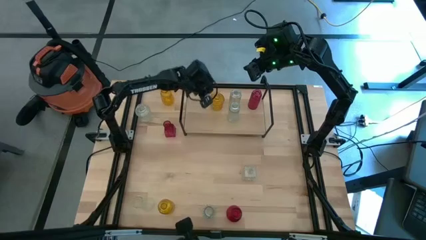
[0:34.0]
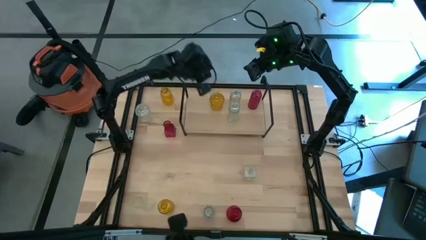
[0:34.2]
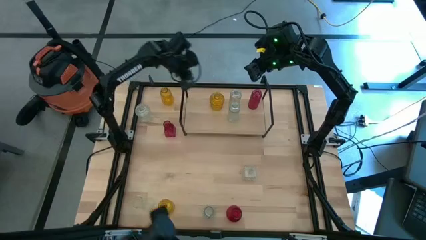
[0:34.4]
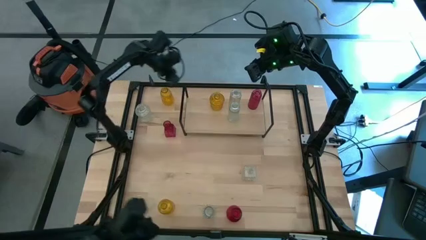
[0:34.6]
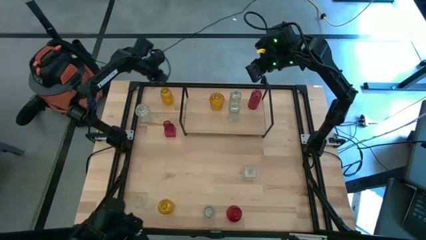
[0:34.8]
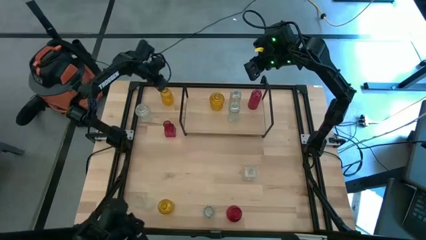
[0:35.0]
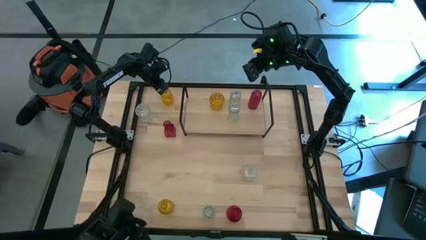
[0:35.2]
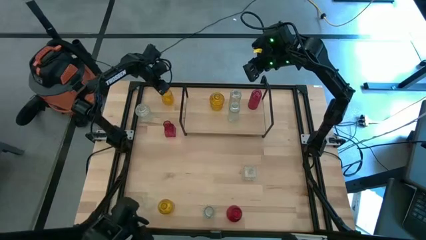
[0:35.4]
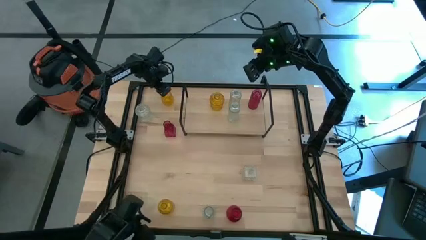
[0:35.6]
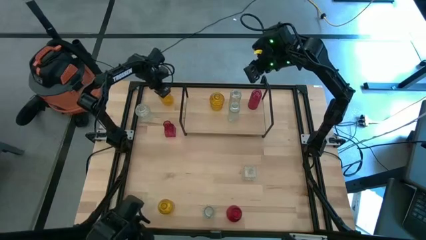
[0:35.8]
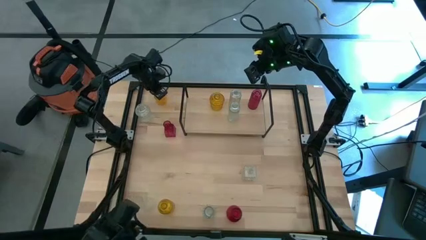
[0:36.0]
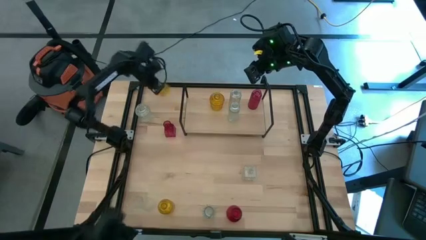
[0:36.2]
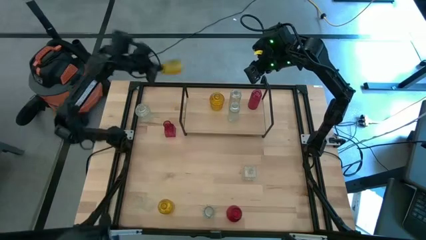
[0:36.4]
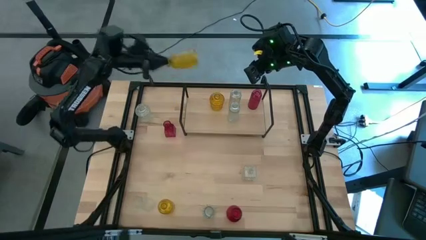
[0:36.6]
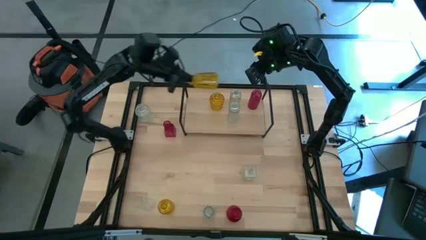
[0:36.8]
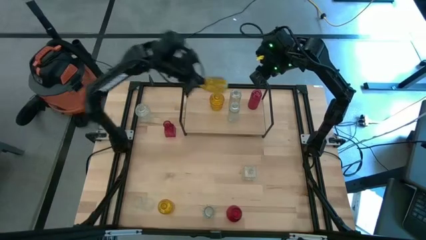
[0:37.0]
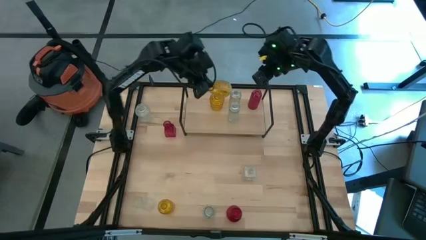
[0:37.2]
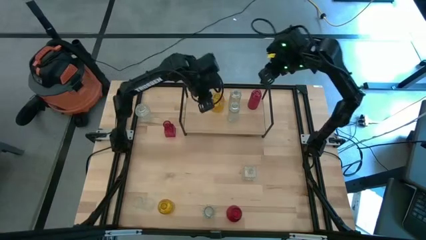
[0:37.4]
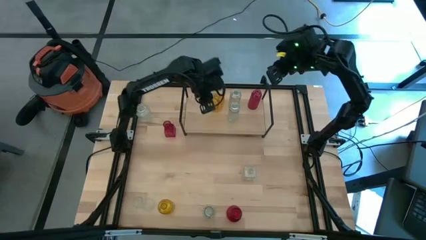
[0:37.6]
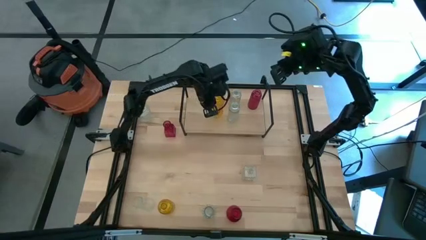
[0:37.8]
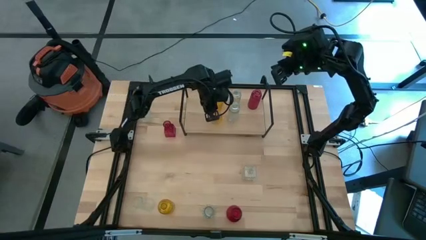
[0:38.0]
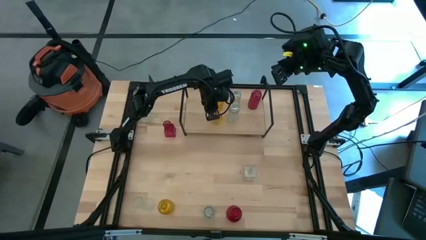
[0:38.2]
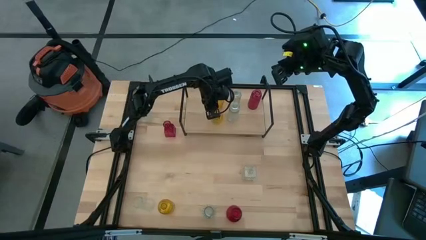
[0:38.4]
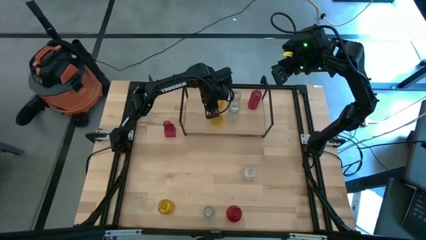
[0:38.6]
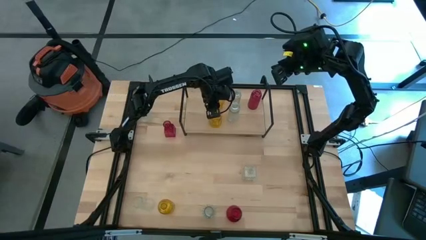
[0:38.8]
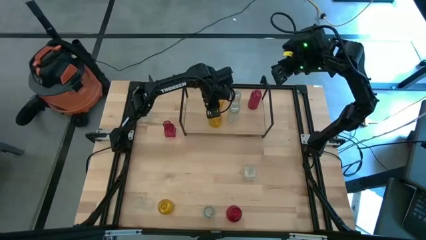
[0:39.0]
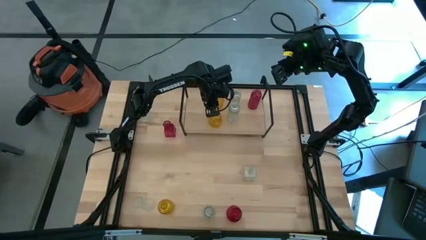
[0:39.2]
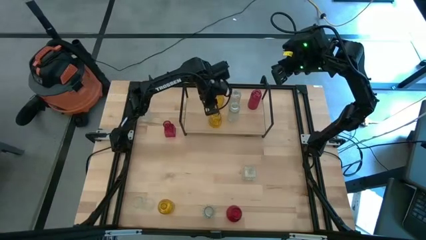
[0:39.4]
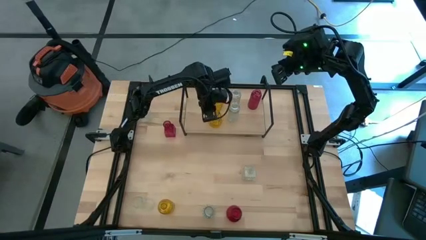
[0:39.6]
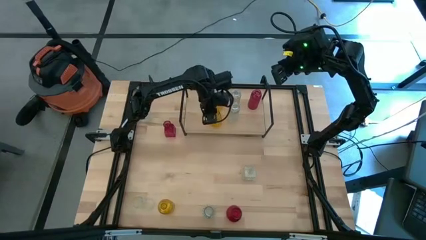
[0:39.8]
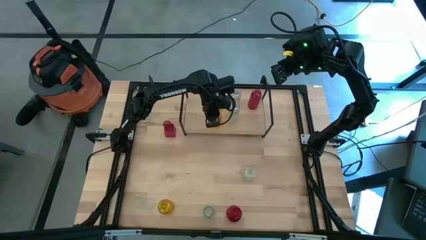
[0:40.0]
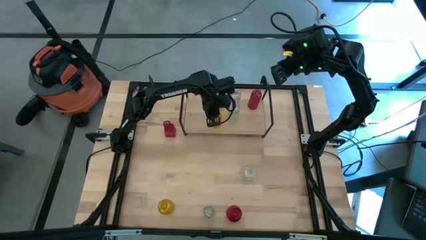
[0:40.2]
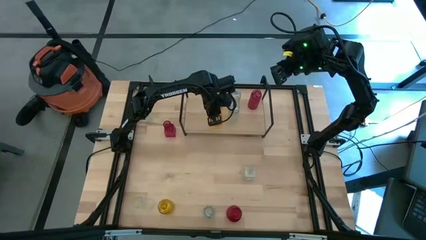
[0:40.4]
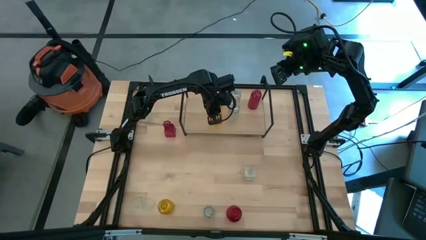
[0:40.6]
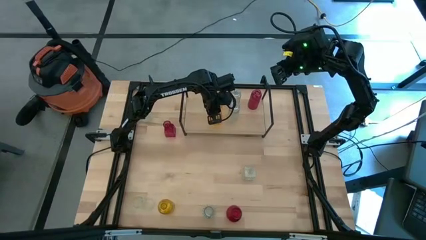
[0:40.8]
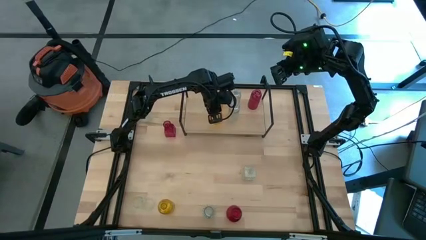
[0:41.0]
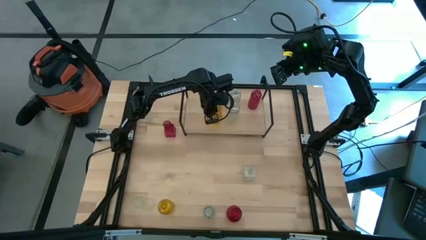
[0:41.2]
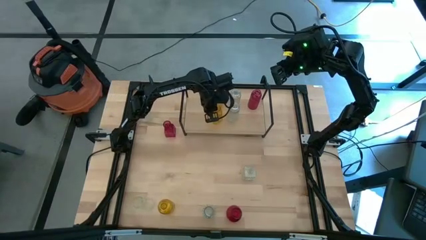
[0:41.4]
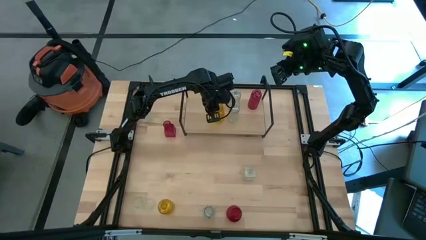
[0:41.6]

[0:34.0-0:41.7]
Task: sort vases onto shelf
Put the yellow vase on the shelf aligned with the other yellow vase

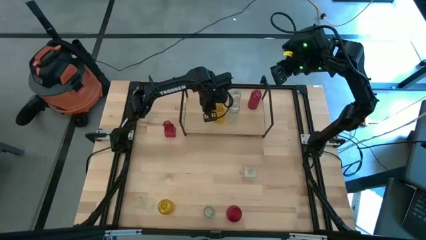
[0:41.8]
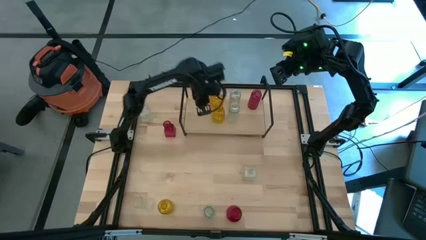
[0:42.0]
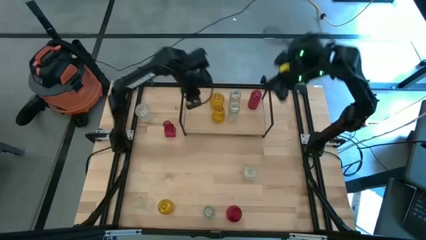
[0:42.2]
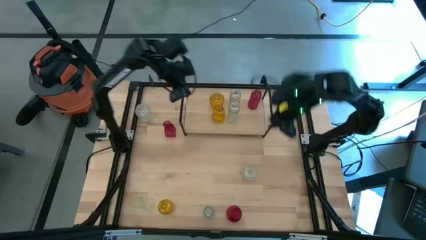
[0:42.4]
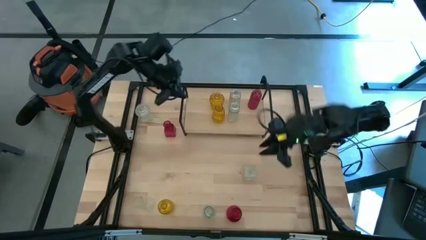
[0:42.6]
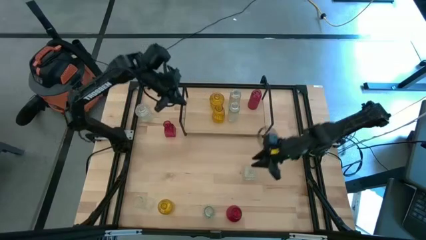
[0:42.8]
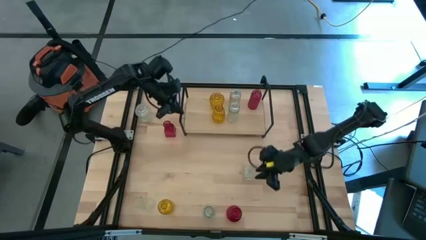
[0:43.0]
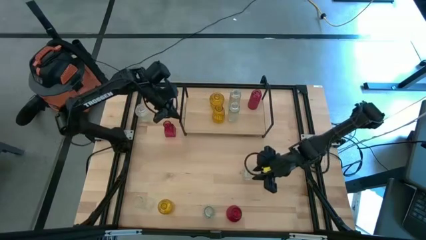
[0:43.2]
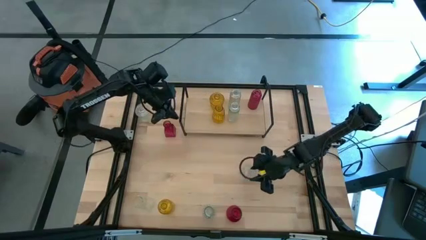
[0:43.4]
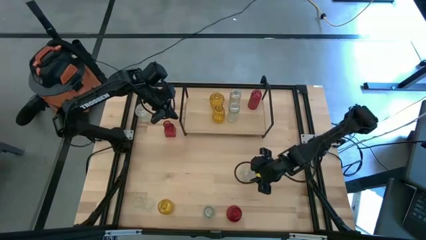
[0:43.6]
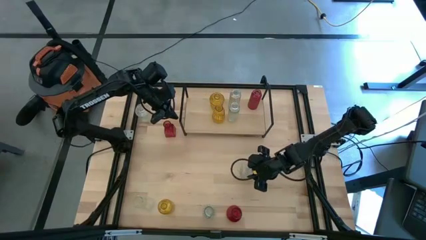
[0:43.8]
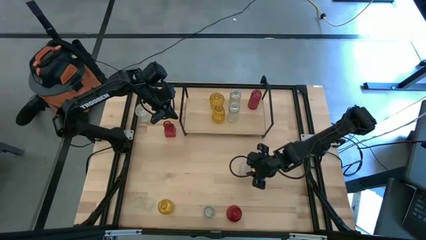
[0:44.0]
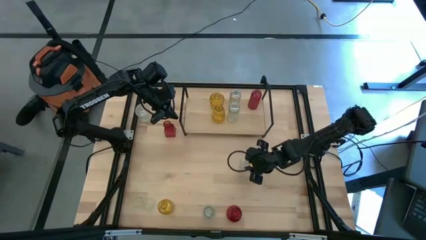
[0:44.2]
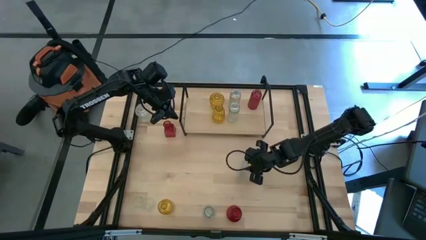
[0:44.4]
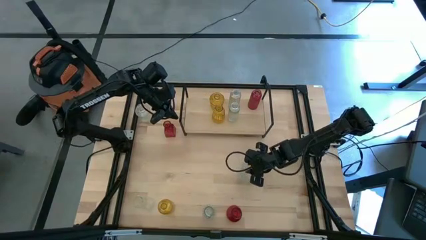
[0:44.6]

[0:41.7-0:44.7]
Put the transparent vase on the shelf aligned with the other transparent vases

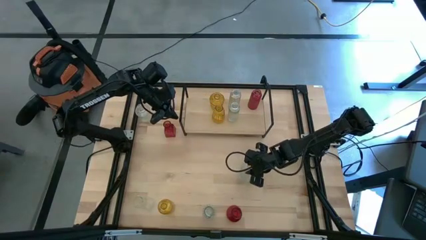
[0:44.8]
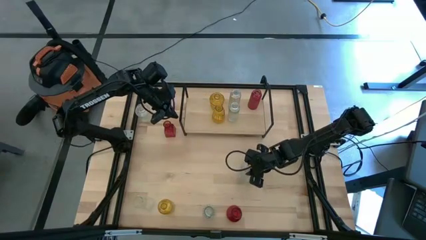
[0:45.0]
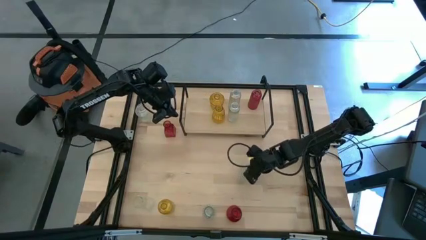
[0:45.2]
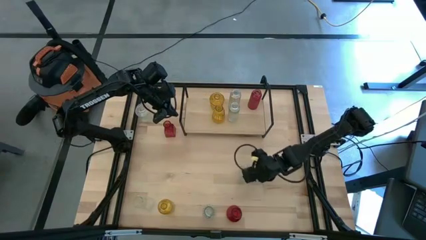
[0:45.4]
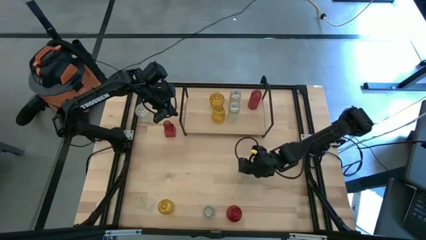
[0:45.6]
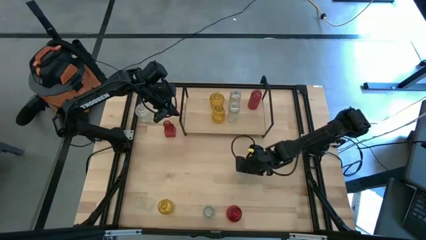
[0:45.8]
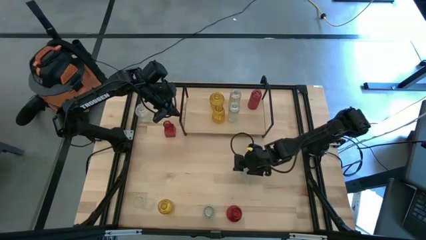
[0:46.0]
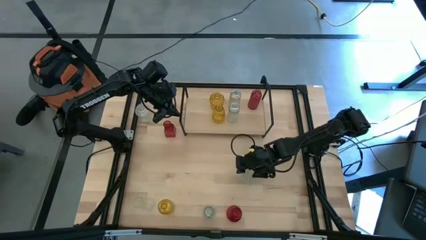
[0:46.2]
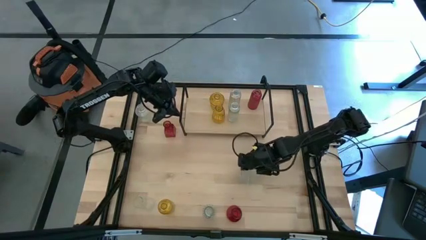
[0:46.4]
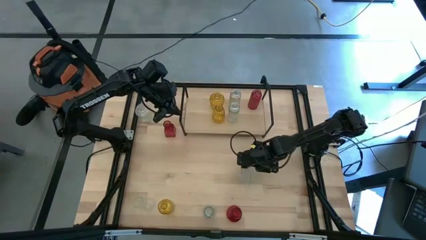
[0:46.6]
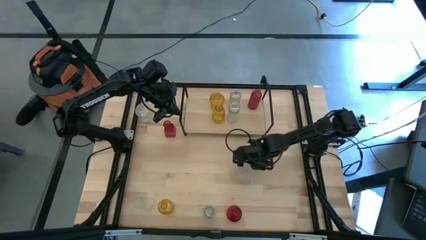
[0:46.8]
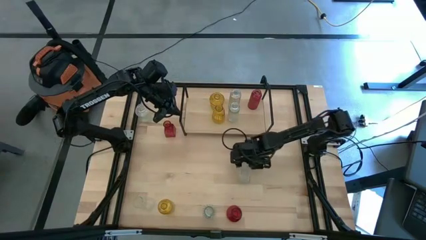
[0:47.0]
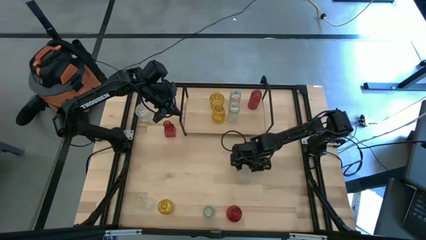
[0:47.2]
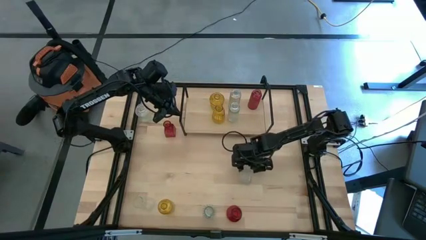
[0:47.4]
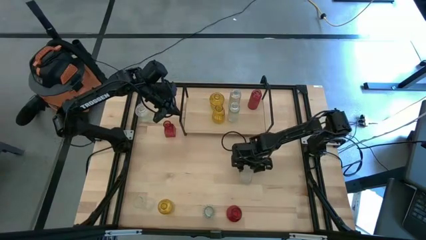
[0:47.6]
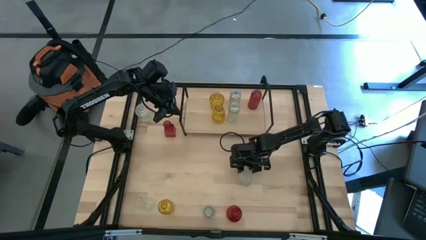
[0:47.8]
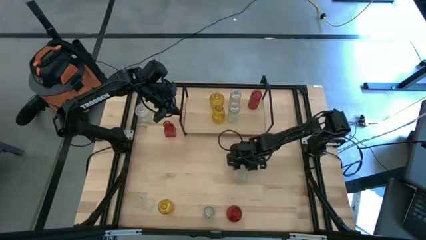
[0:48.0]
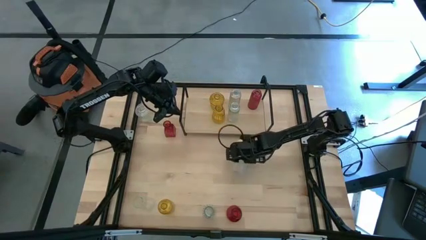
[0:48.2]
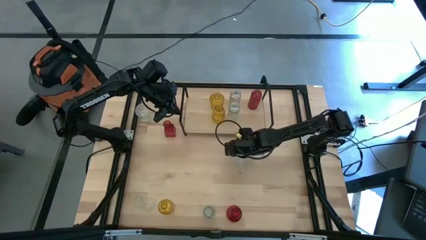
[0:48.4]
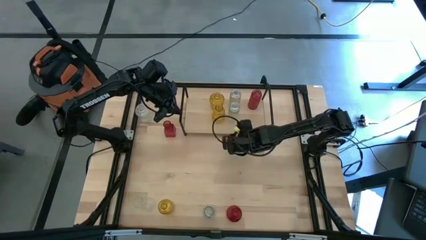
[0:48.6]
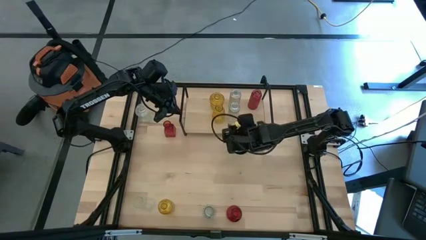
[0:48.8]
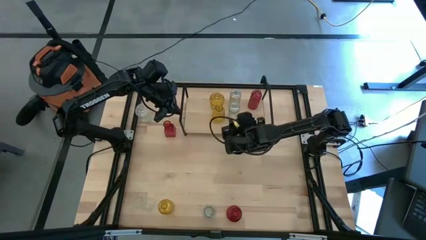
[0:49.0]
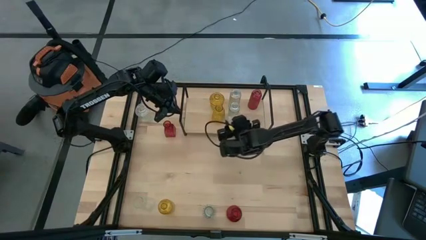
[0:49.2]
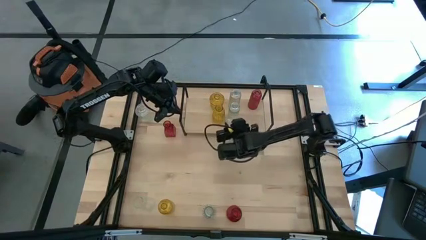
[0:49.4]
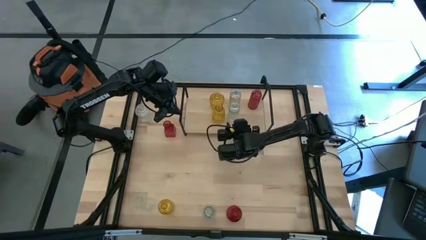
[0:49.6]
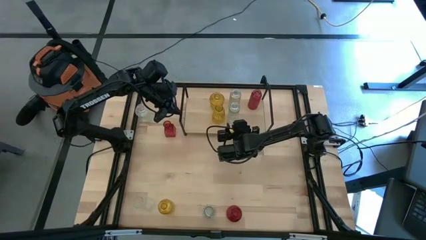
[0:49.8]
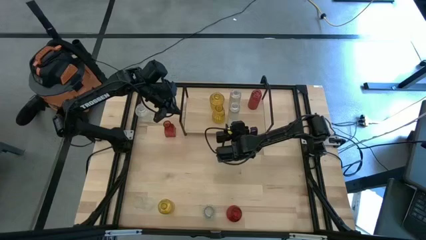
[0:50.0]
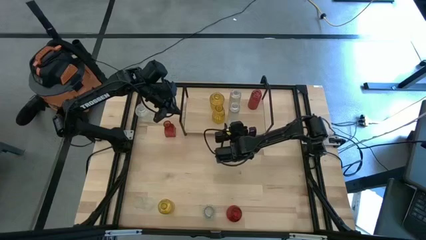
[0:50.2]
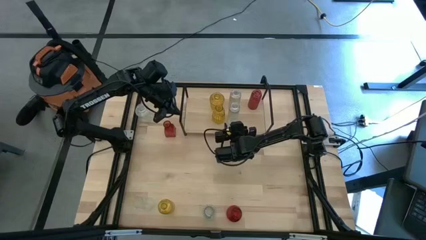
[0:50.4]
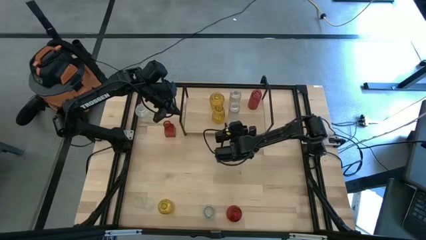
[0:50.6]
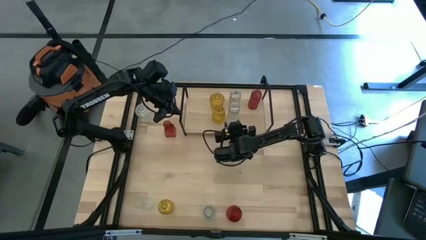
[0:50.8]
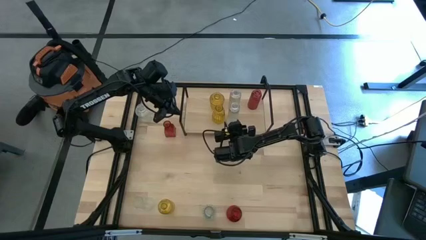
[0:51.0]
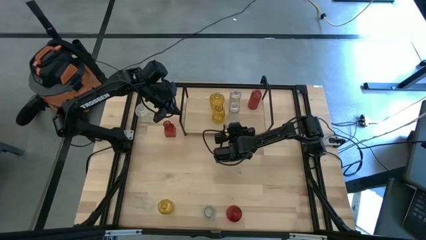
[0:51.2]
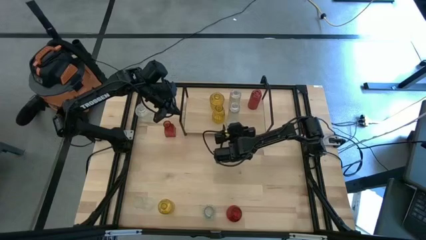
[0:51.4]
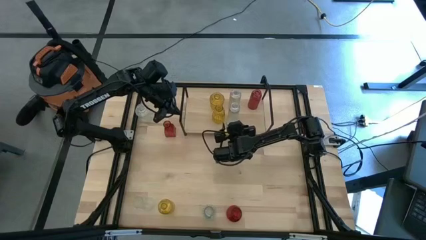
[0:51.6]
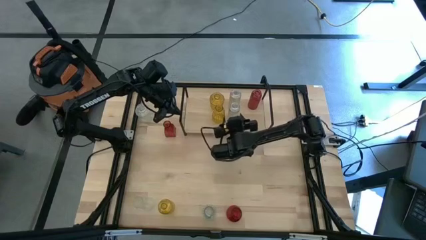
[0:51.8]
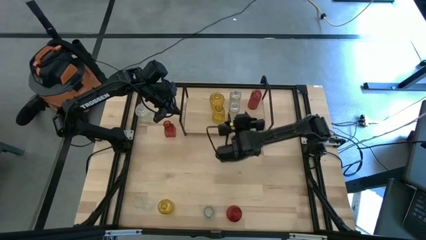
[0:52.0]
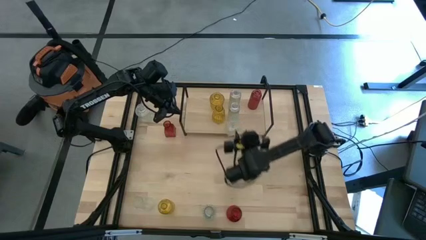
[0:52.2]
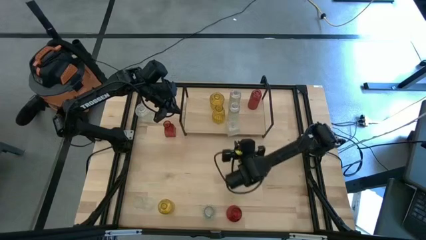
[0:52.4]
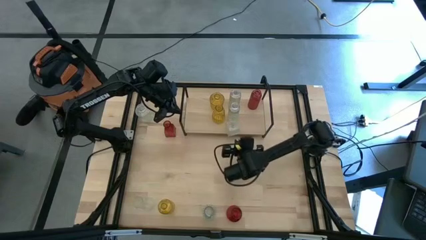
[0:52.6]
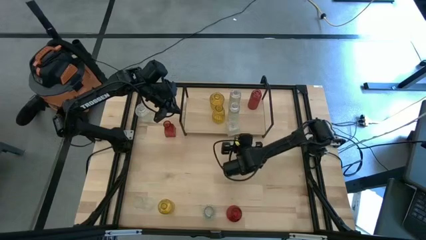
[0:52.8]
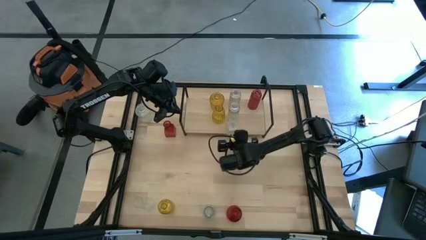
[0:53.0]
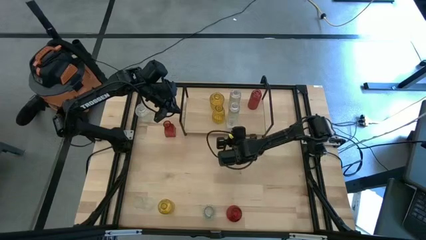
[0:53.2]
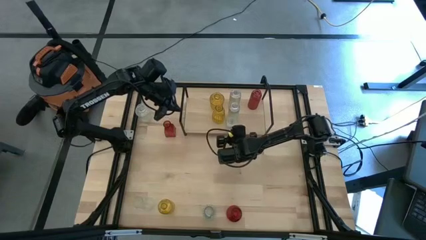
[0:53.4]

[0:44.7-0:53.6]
Put the transparent vase on the shelf aligned with the other transparent vases
